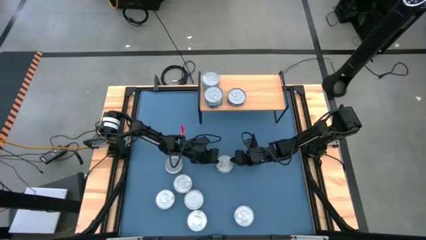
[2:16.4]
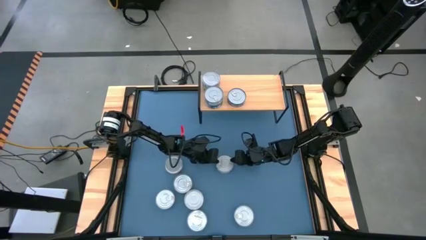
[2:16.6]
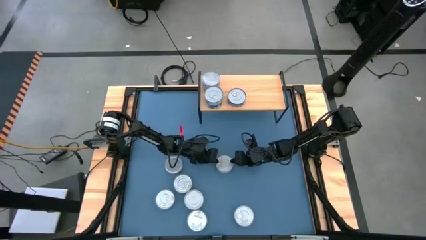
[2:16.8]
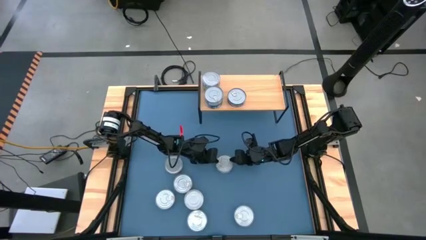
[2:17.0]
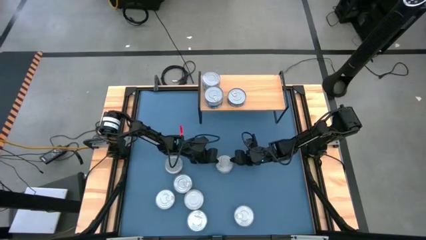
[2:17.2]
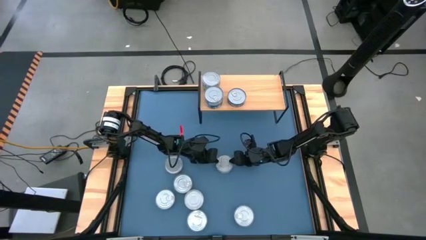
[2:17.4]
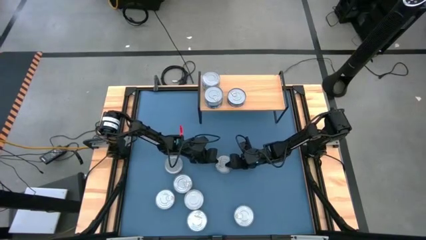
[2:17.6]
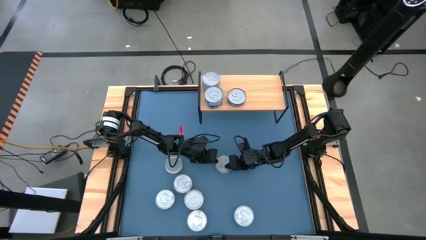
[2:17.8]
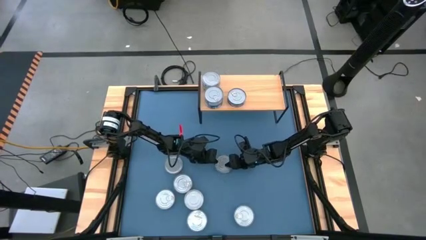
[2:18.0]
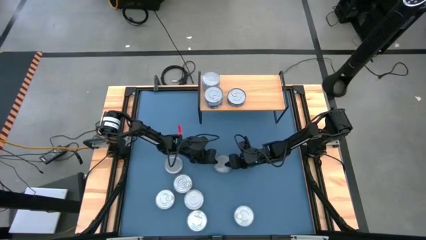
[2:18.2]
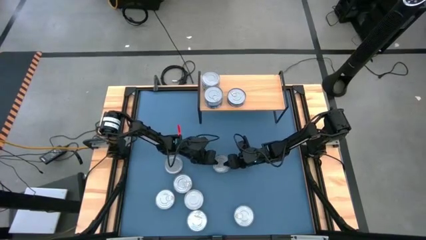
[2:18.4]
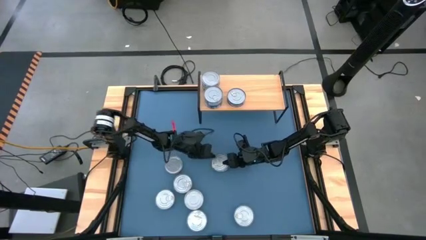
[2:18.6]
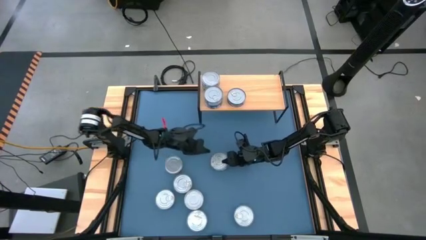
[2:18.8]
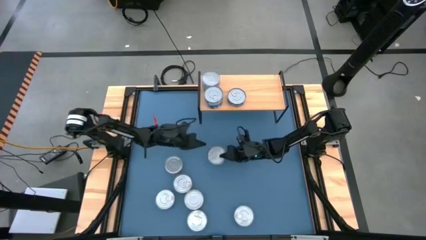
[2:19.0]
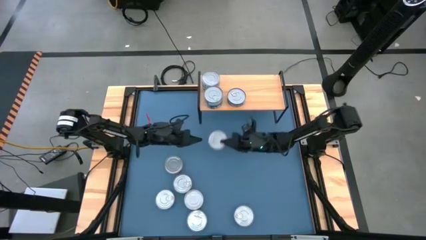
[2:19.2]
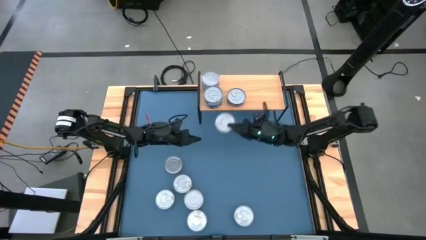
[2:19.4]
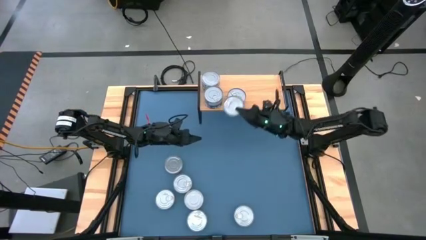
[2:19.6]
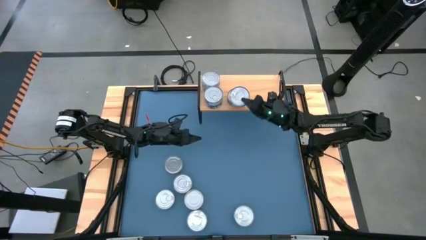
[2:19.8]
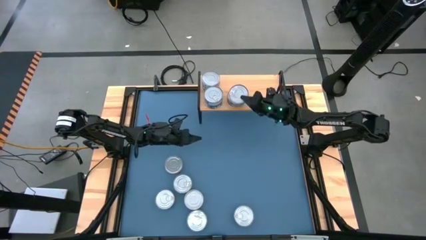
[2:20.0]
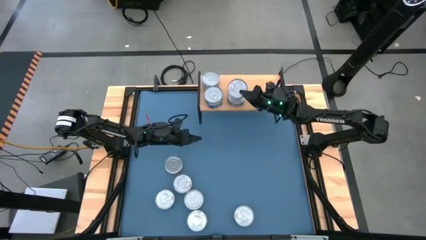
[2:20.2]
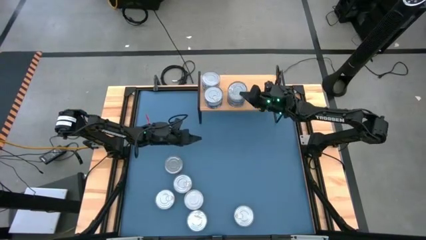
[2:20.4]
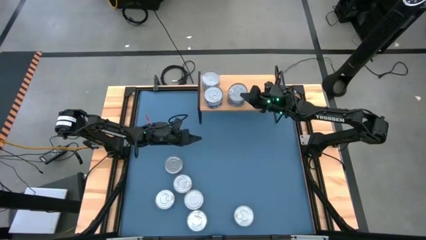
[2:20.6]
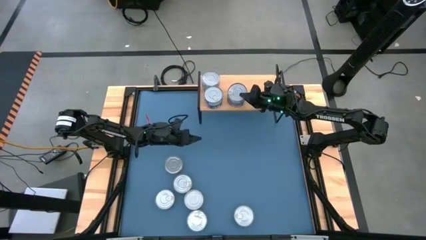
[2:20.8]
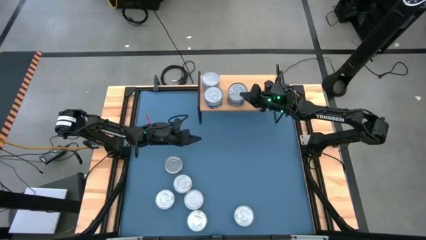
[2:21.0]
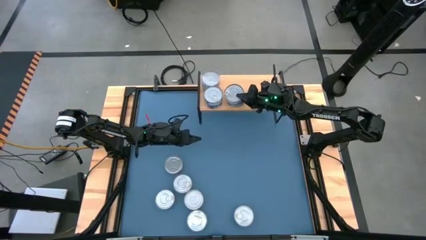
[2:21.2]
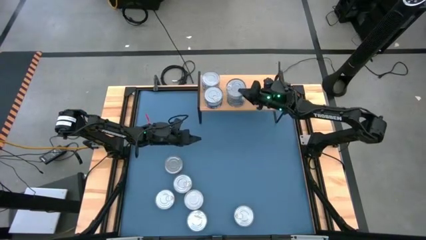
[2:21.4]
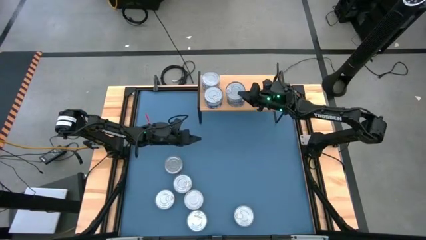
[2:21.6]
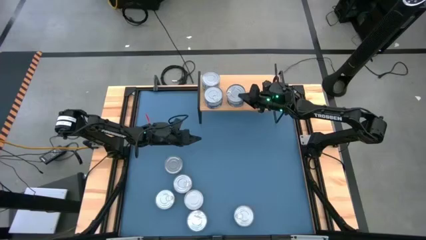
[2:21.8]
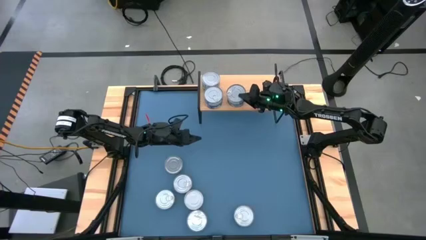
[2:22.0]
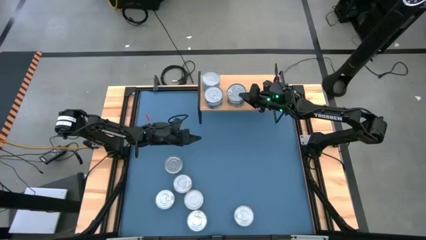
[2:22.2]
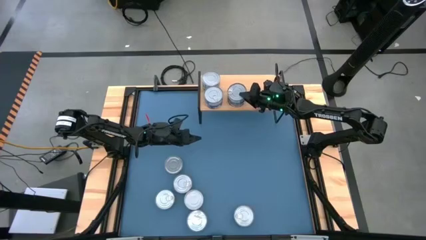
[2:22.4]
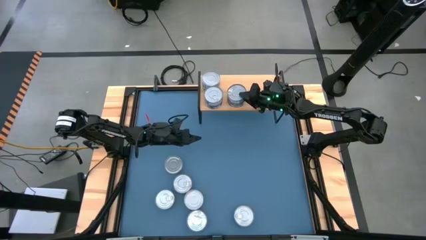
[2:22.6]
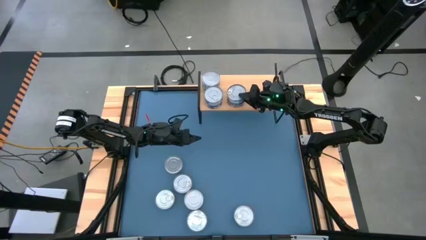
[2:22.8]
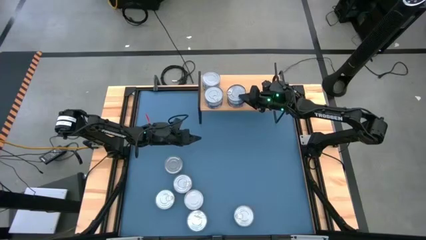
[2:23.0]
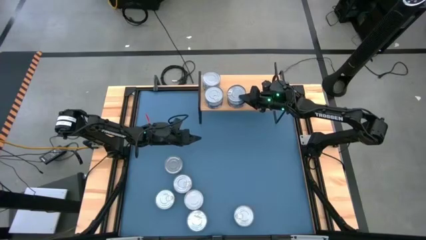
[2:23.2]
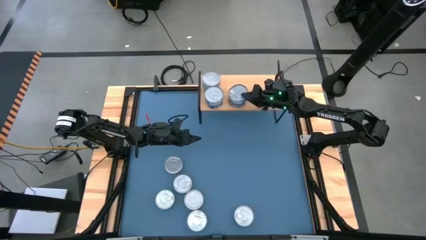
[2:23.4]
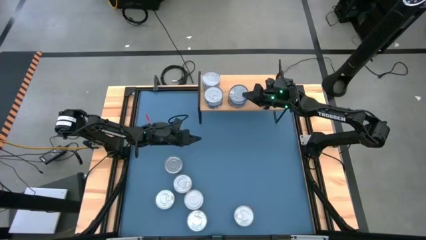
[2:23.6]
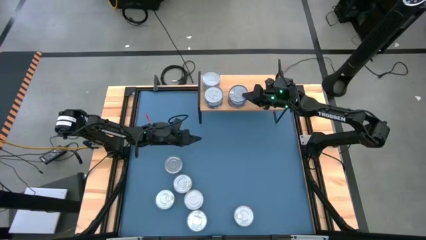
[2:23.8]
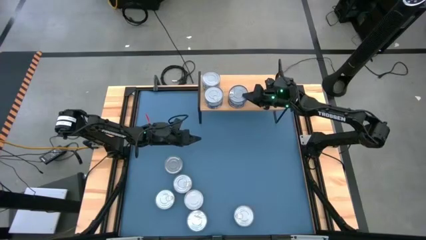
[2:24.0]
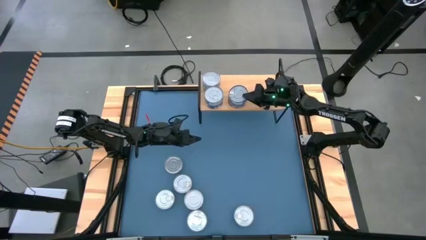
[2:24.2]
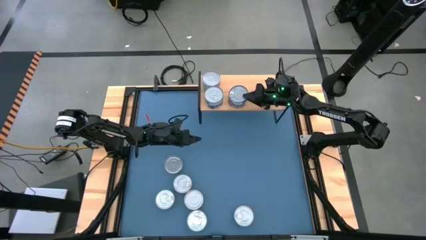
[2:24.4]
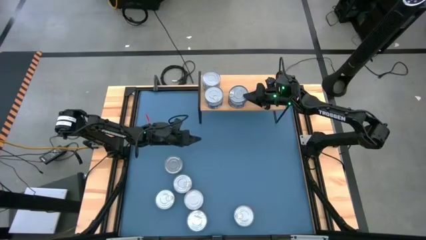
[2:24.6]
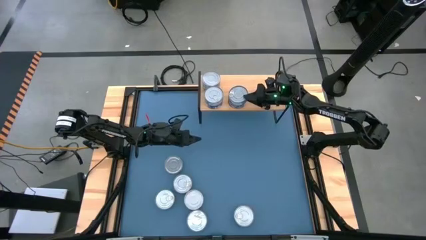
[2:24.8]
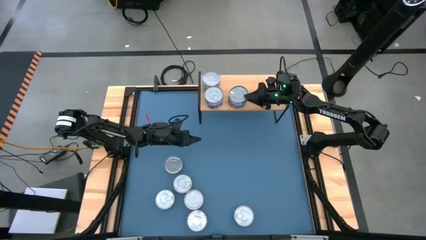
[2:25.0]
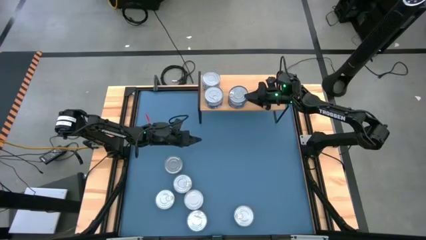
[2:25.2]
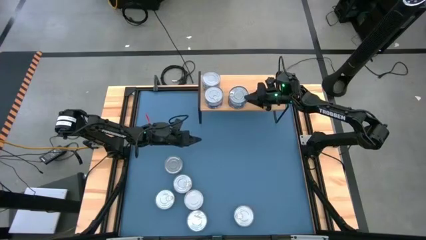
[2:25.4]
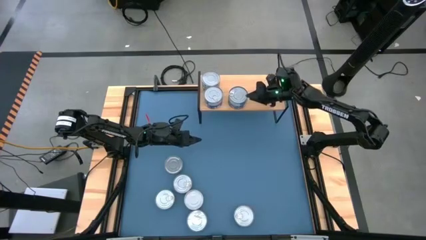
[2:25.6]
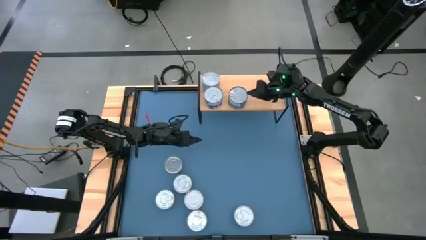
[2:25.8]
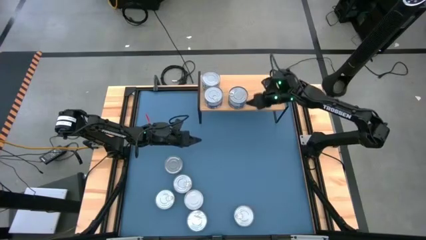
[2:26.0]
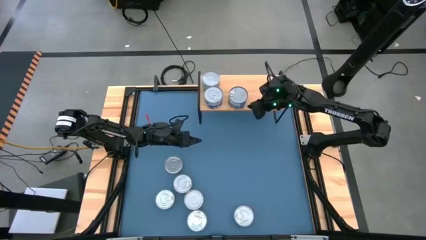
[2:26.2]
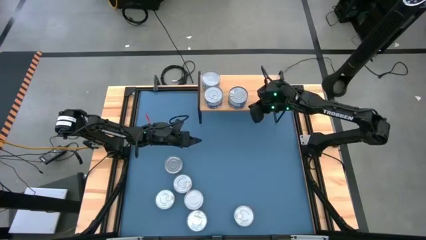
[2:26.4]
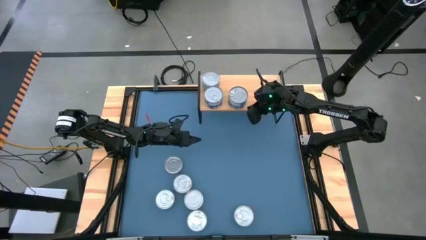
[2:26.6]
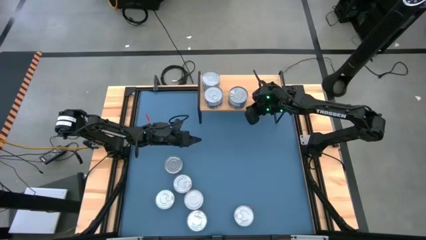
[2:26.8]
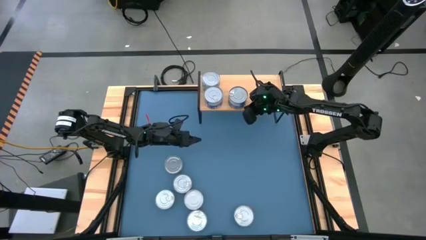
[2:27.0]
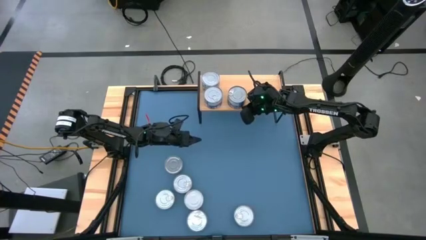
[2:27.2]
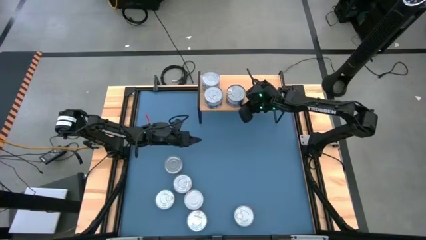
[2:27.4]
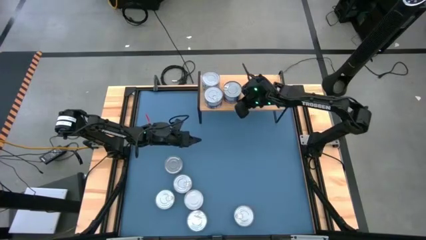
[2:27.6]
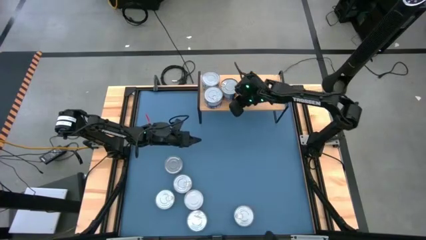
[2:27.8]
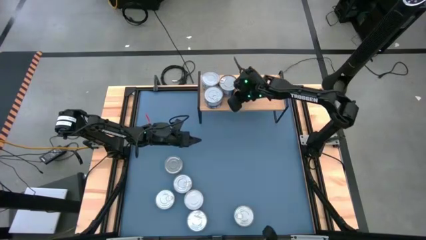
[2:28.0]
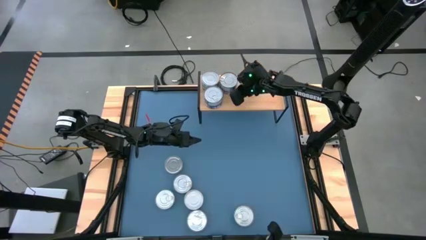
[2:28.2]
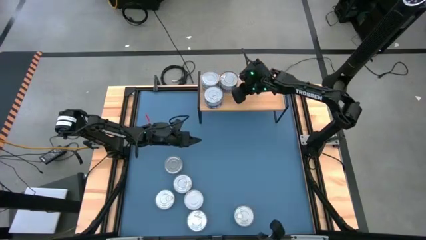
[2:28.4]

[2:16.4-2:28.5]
Task: Stack canned seafood by type on shelf
Stack the blue tuna can on top of the blue tuna can on the shelf

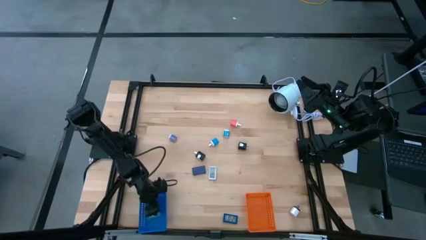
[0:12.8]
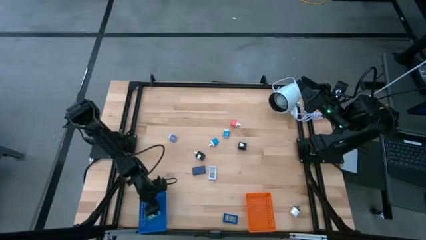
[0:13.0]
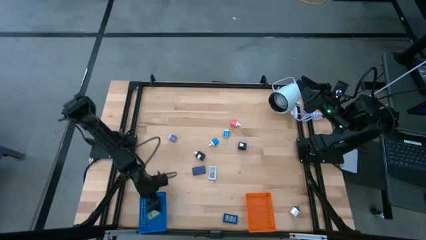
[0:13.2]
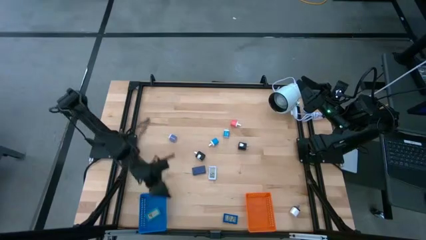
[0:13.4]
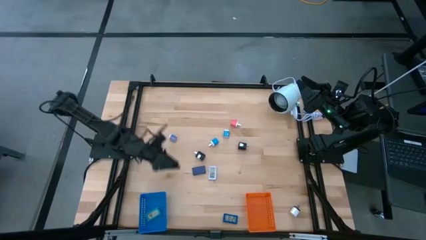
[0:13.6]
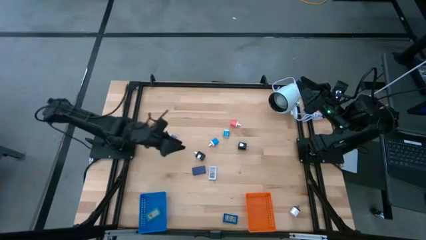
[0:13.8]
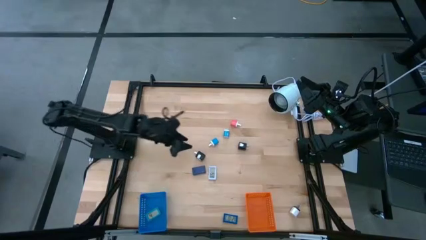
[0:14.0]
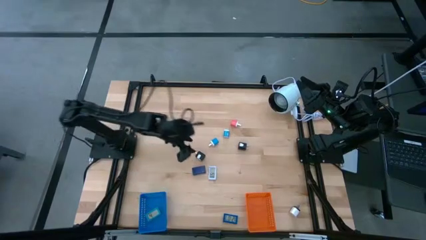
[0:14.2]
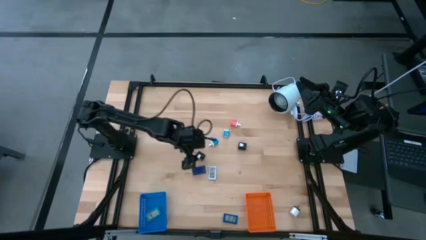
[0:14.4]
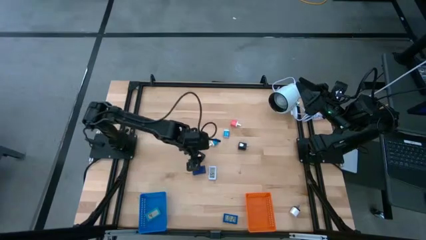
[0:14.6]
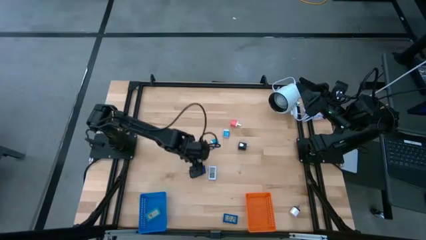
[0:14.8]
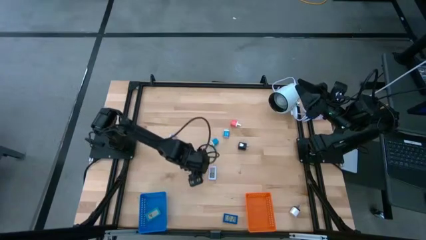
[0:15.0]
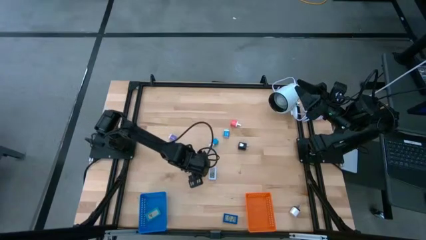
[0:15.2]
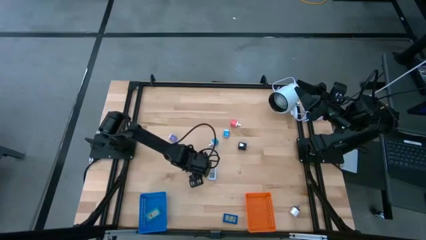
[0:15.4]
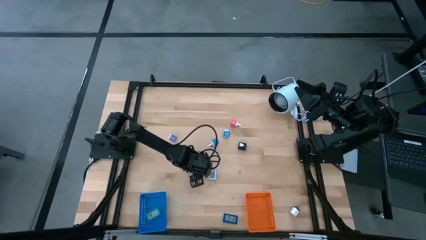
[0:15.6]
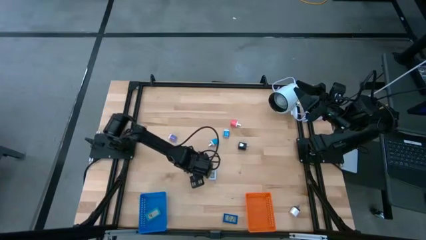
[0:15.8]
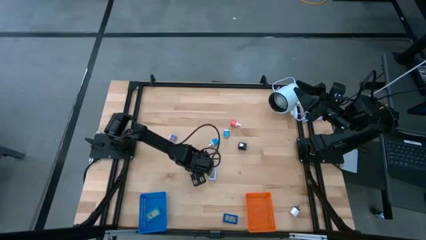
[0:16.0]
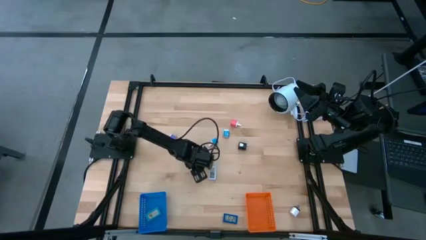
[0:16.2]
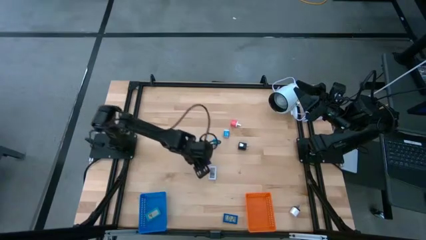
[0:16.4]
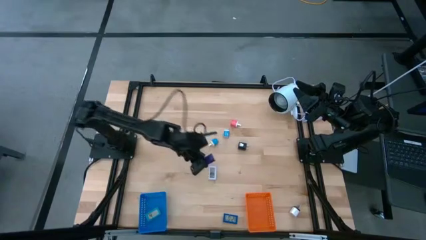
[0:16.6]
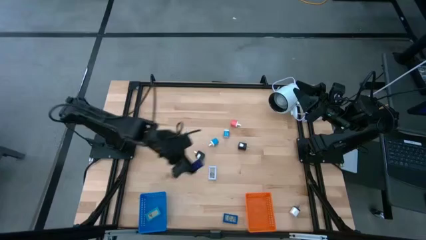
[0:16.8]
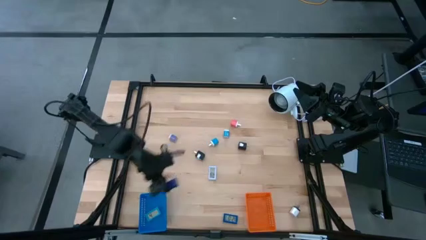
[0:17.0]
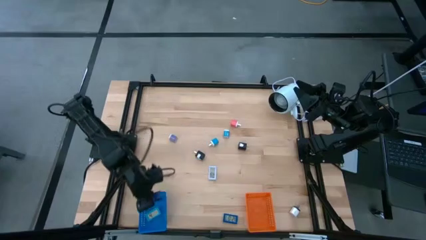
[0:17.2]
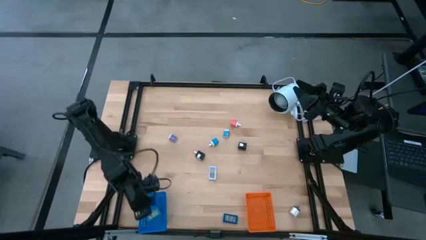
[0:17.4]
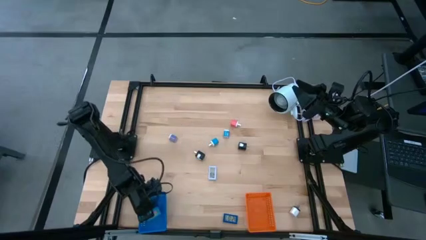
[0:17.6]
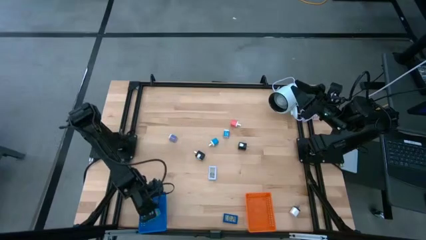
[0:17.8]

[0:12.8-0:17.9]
Task: Pick & Place Office items
Put the purple digital clock into the blue bin
